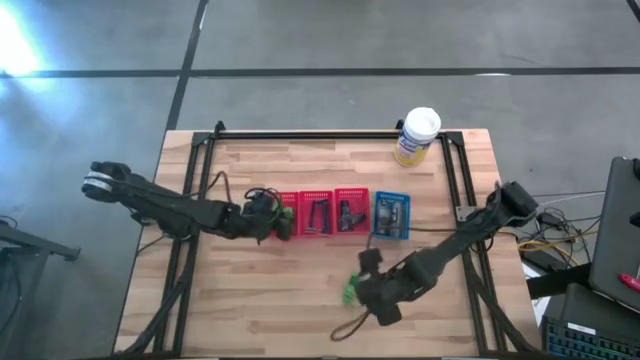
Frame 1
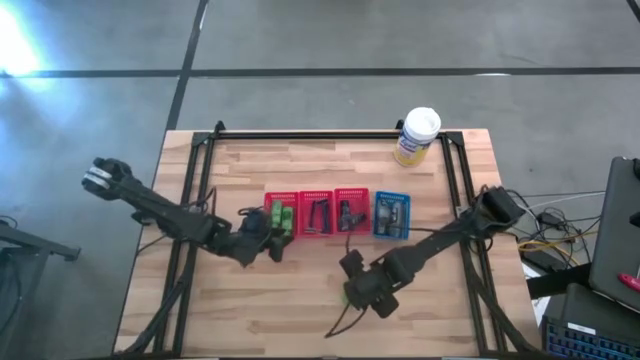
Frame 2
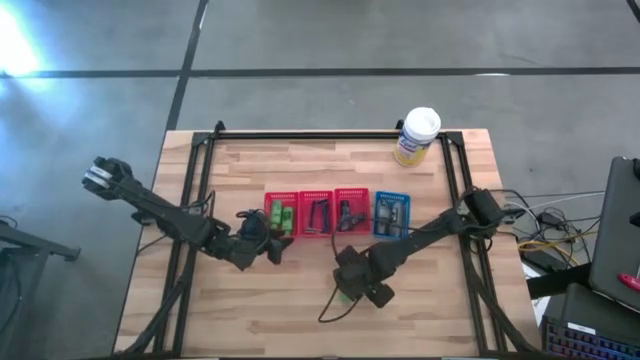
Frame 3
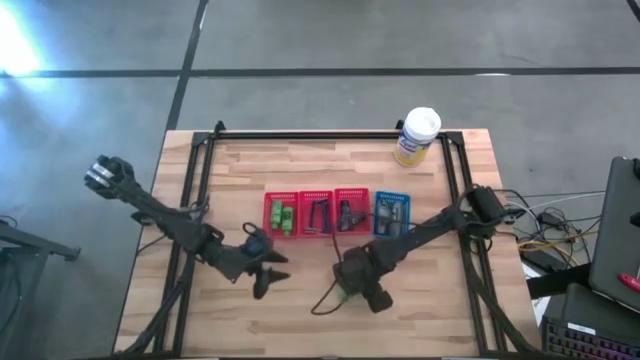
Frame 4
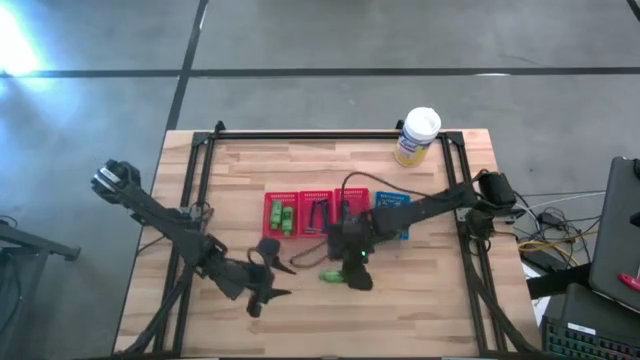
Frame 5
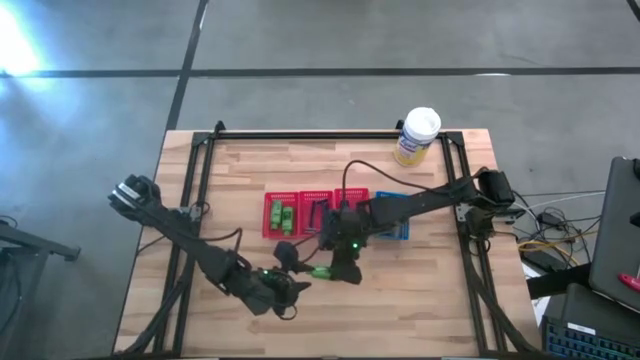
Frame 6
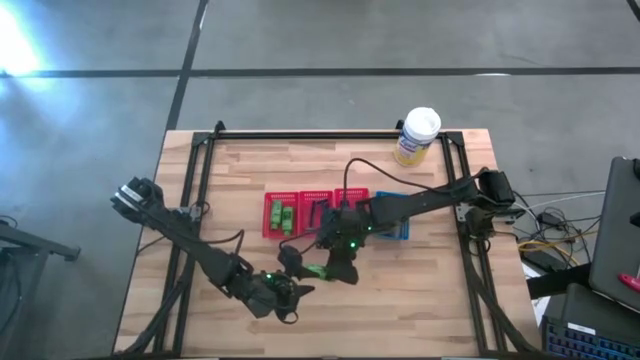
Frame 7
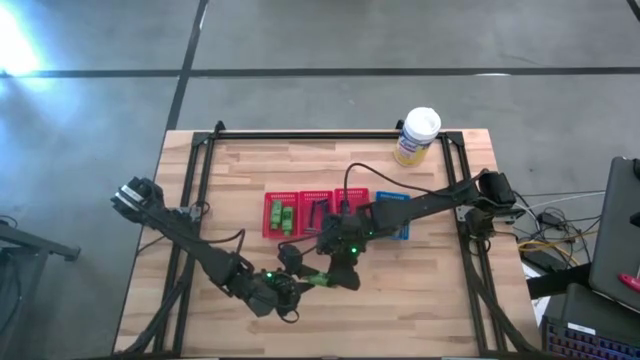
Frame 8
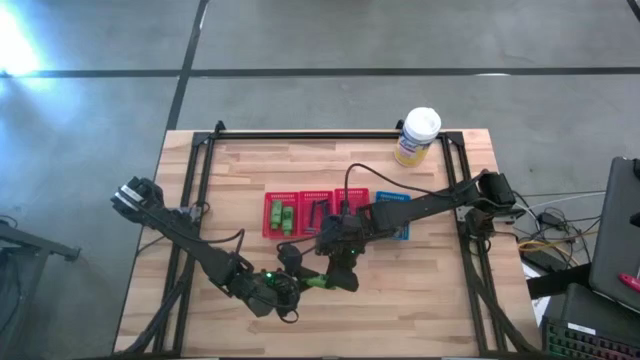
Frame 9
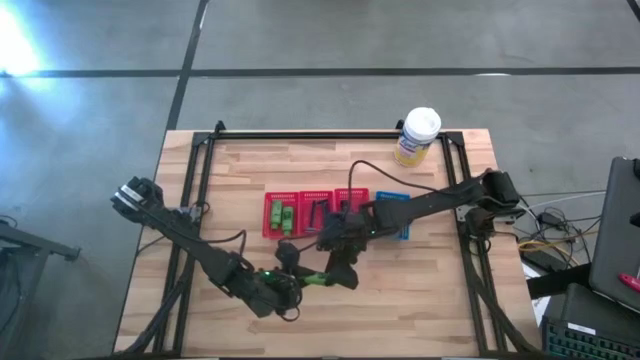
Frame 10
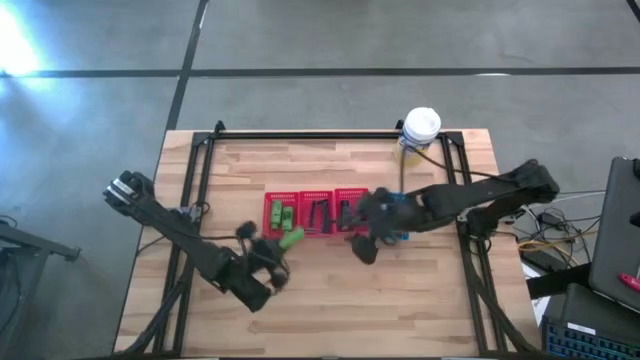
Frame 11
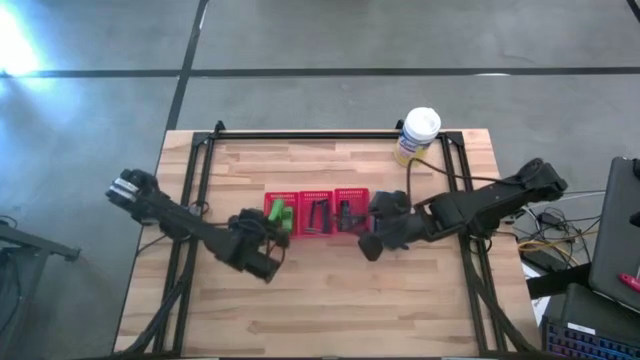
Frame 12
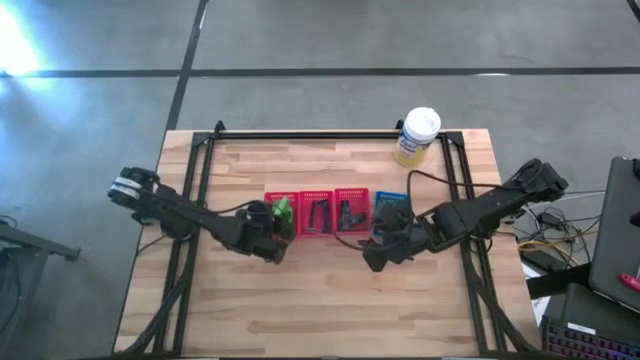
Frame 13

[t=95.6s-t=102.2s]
Task: Pick & Place Travel size toiletries
Put the green shampoo into the left red bin

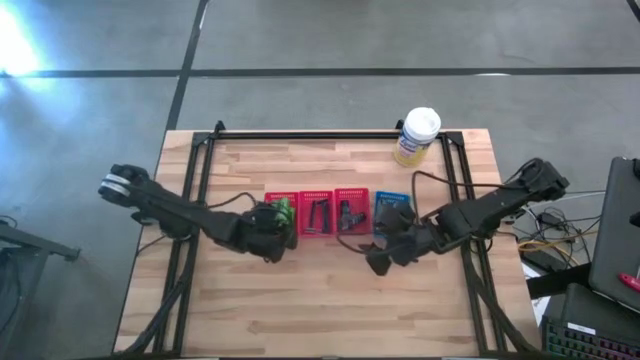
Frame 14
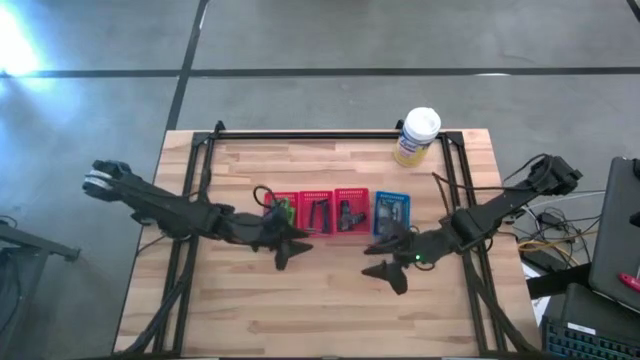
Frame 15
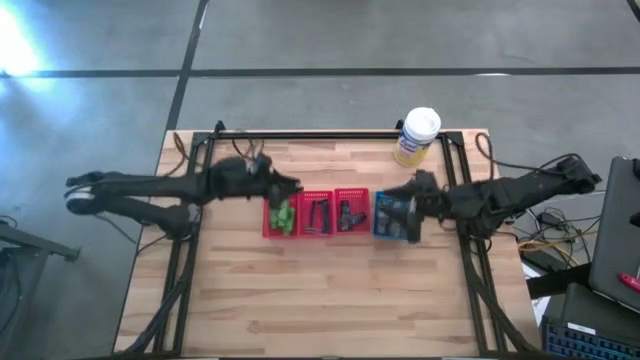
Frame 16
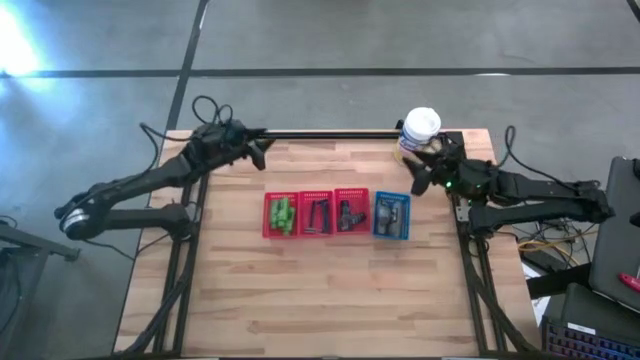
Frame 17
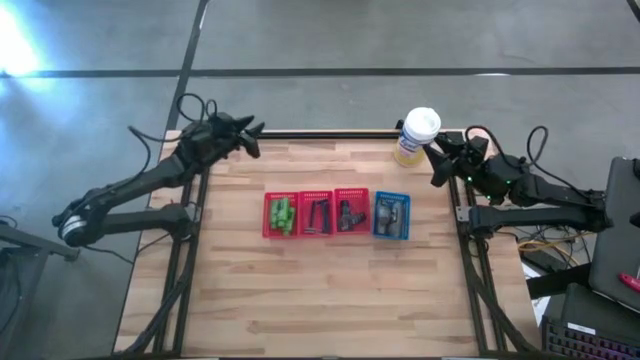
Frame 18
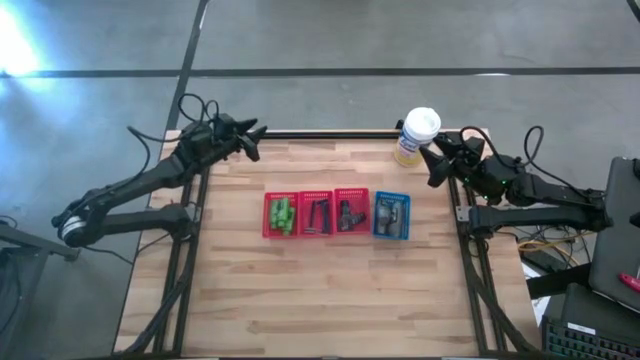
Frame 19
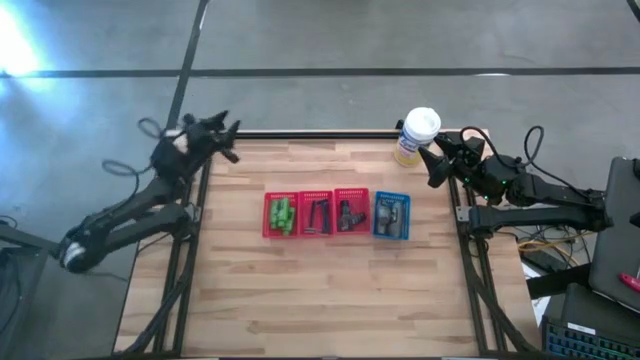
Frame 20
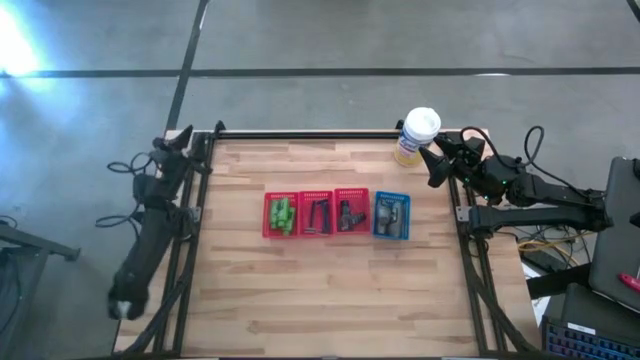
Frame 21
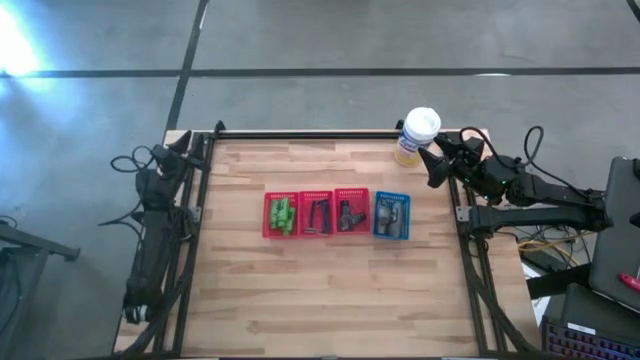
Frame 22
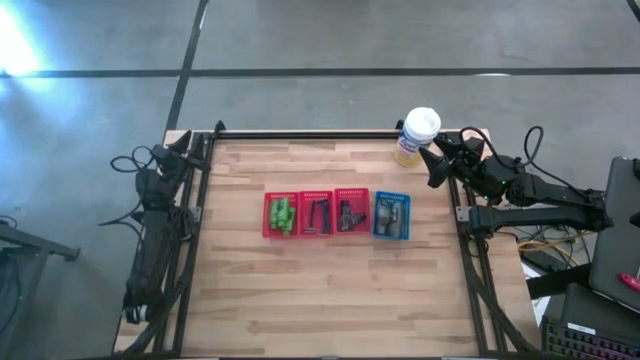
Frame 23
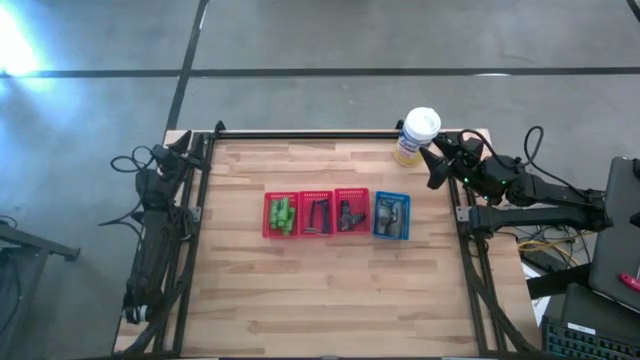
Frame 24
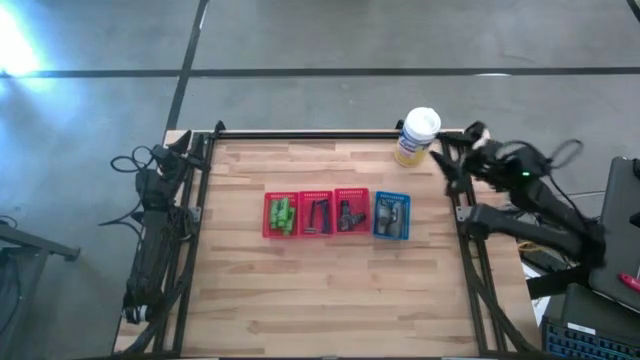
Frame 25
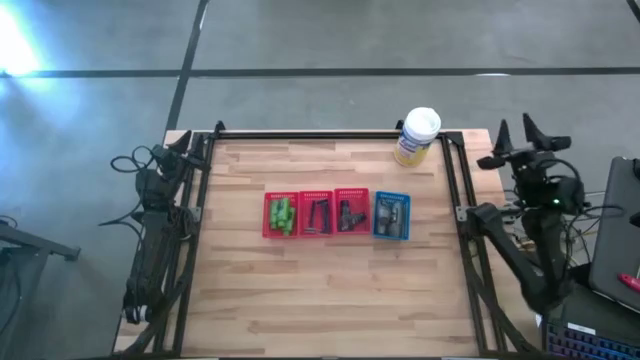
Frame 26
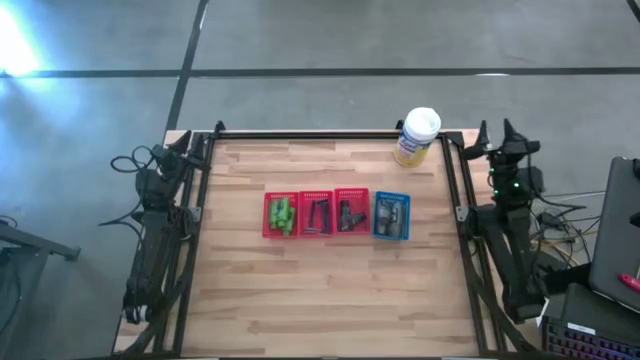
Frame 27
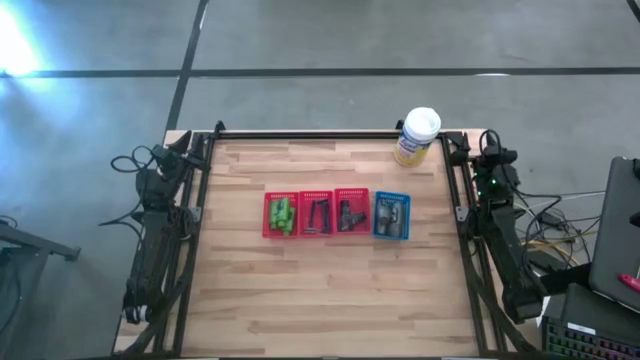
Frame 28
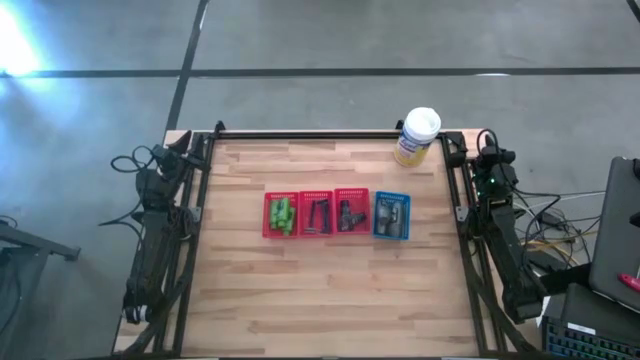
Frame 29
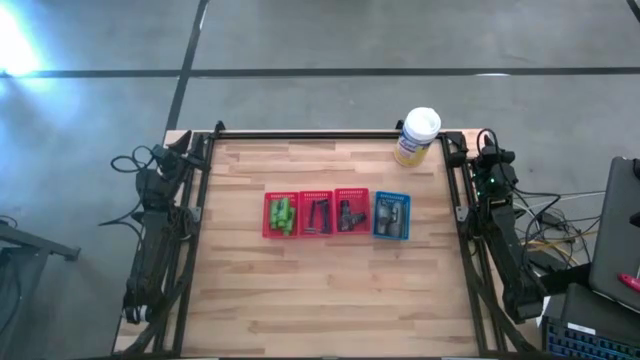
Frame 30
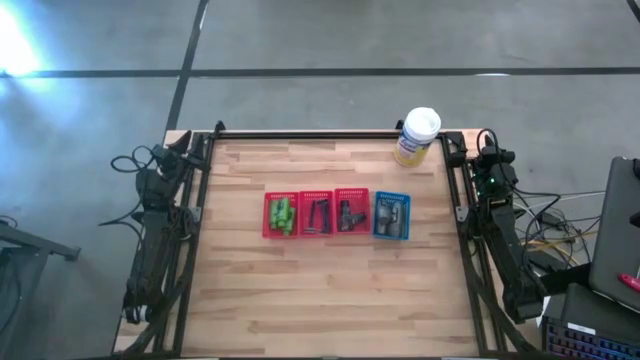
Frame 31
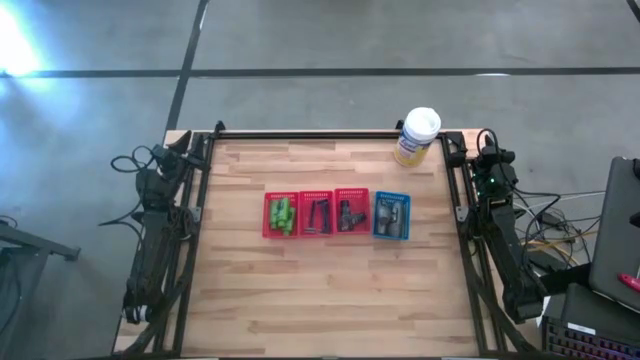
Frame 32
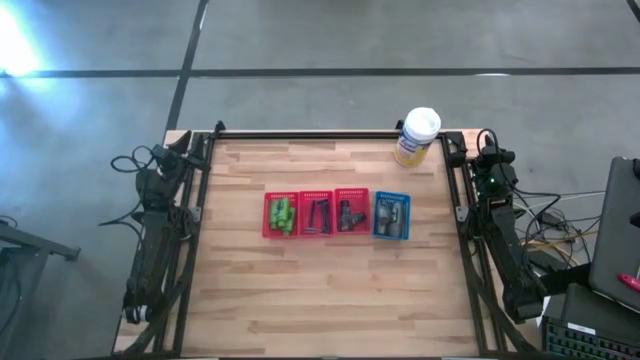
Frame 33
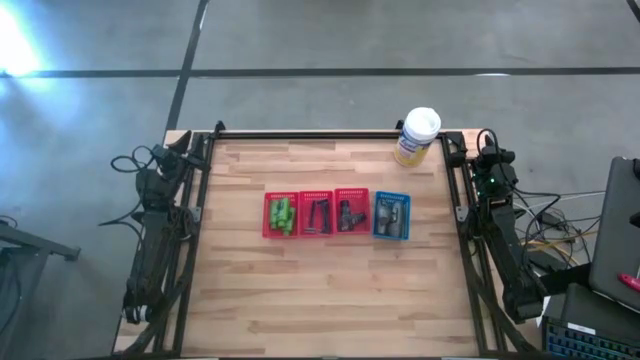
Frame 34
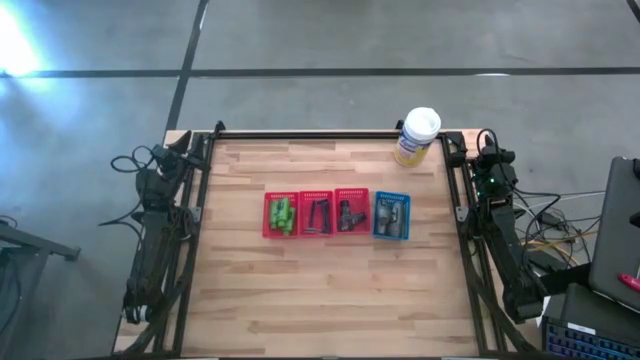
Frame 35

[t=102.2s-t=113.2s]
Return to Home Position

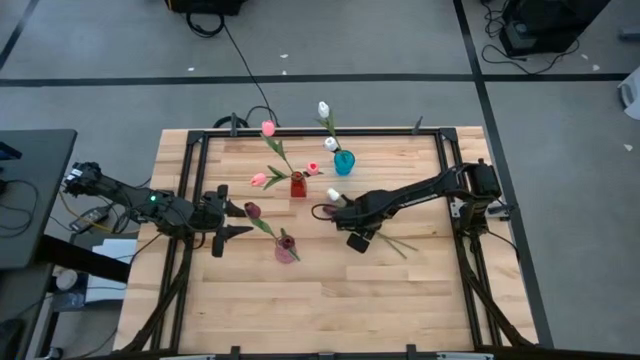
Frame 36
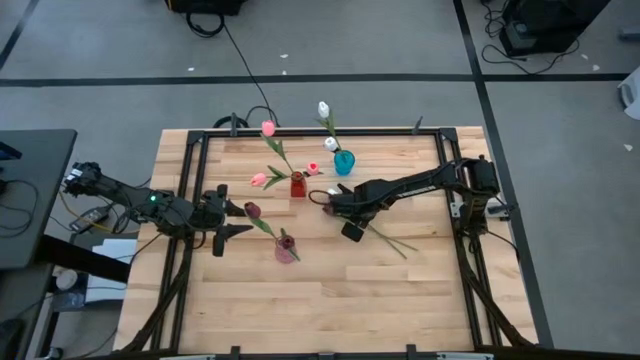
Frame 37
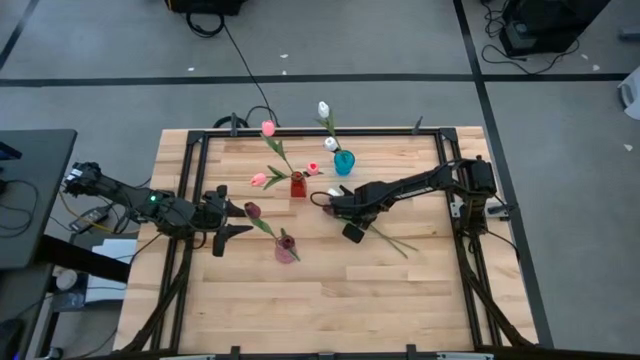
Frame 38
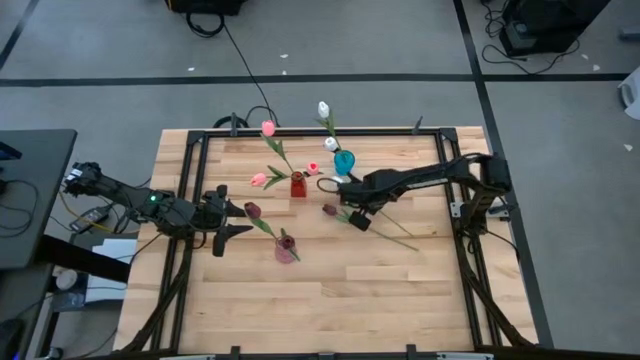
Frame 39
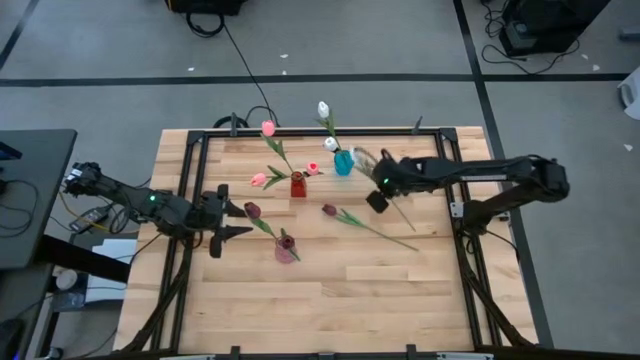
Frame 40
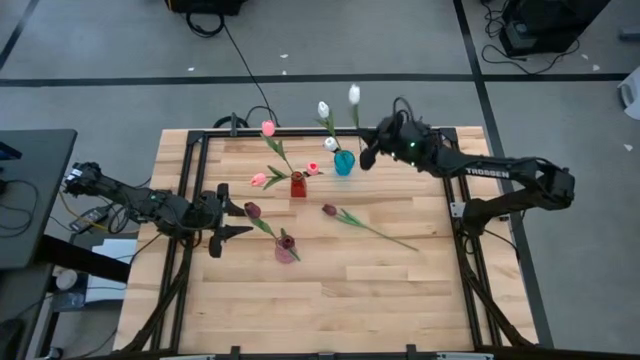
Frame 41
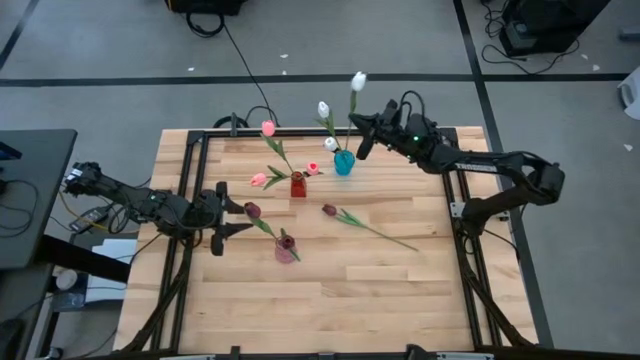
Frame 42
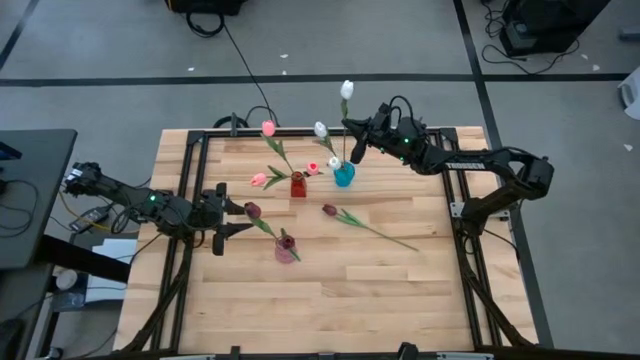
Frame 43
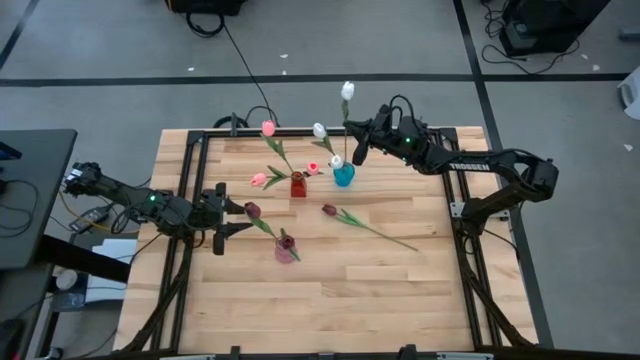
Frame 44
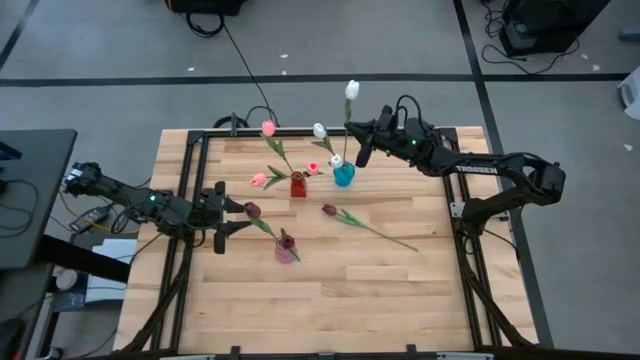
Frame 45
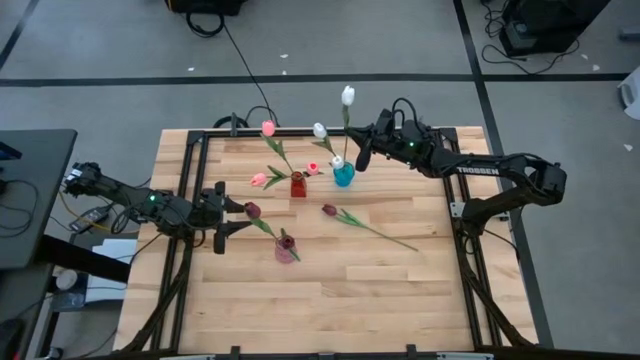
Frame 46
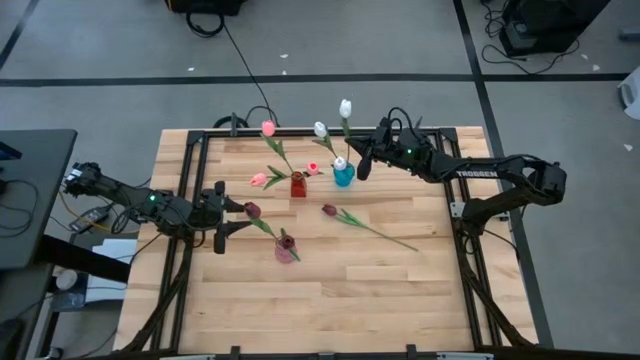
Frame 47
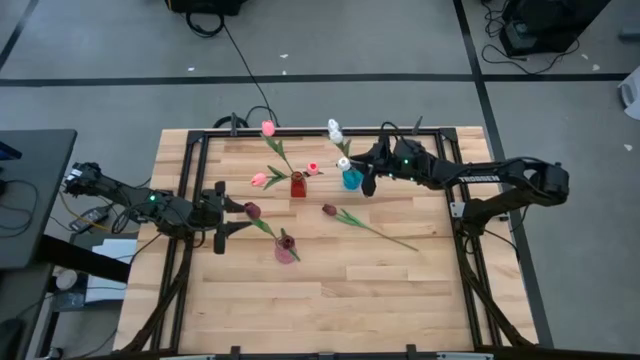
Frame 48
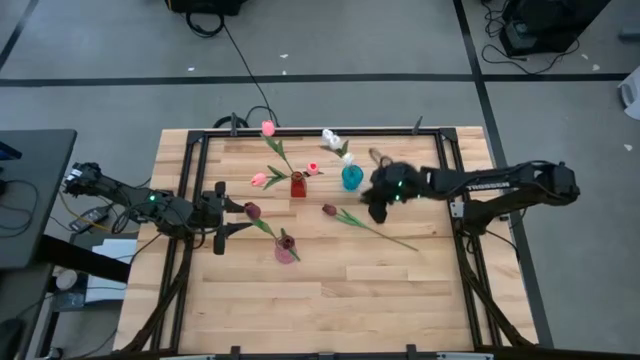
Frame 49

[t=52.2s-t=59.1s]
Task: Sort flowers into vase by color
Put the white flower into the blue vase
